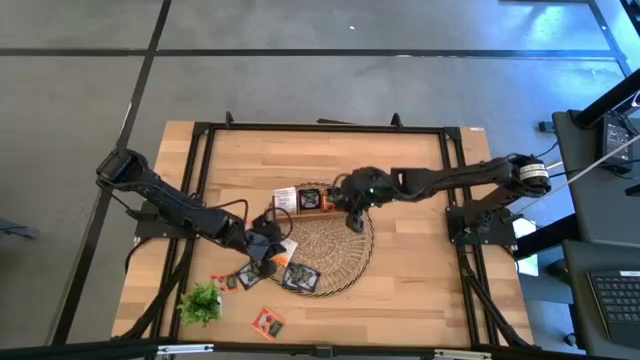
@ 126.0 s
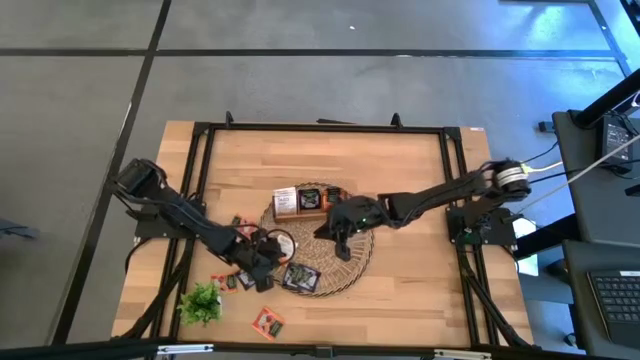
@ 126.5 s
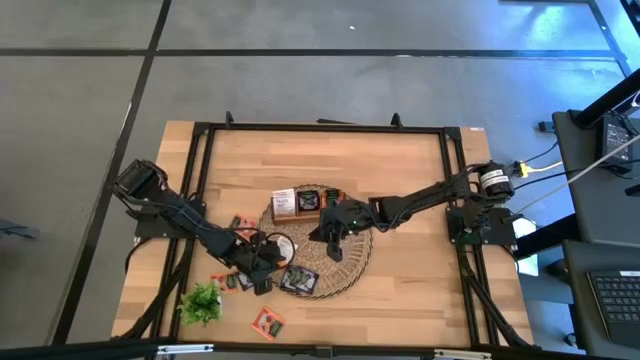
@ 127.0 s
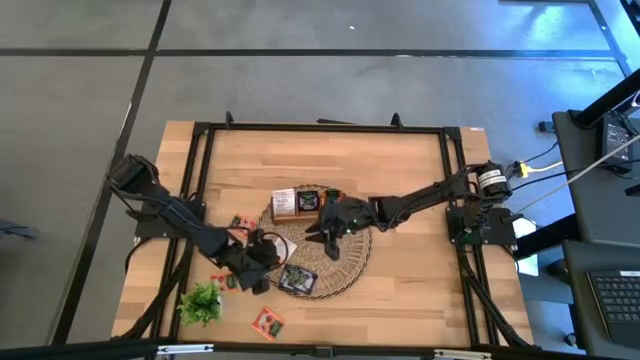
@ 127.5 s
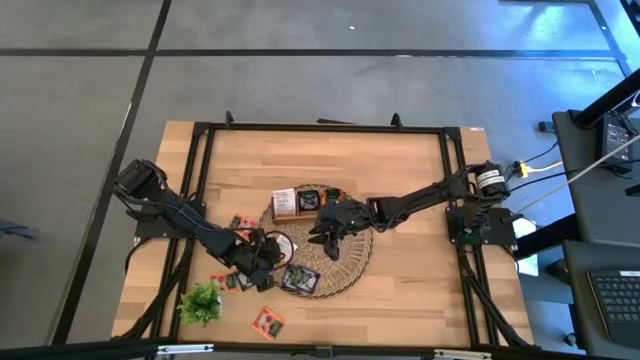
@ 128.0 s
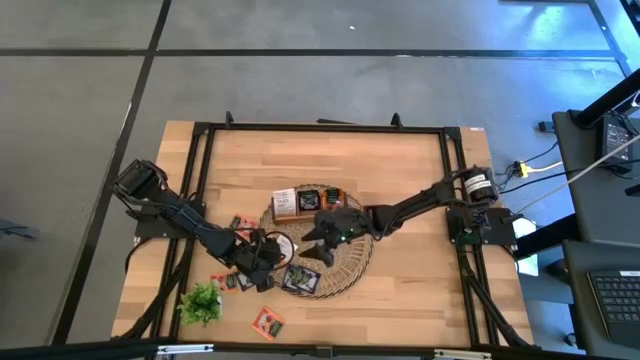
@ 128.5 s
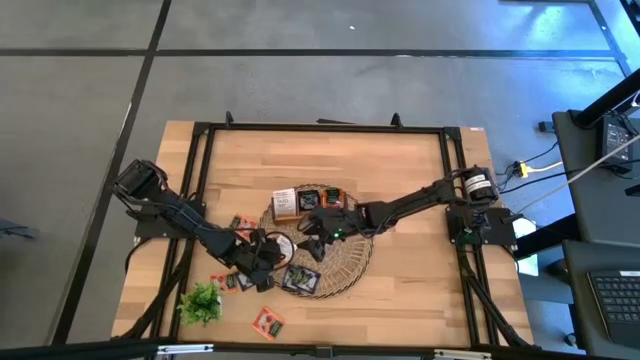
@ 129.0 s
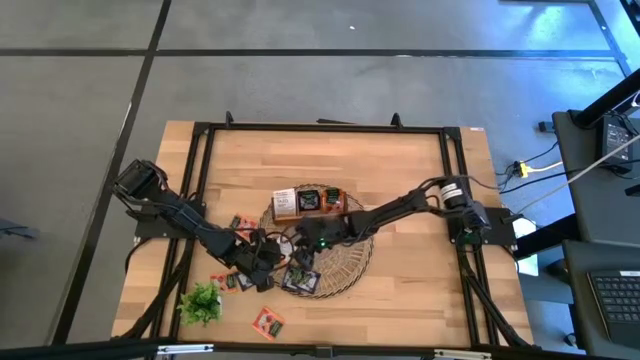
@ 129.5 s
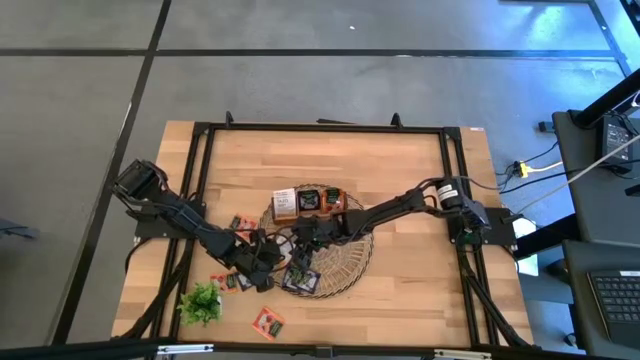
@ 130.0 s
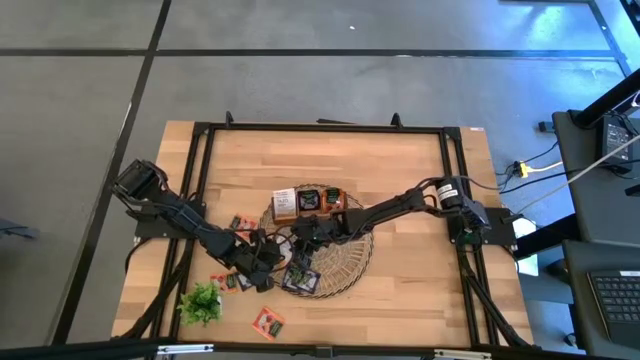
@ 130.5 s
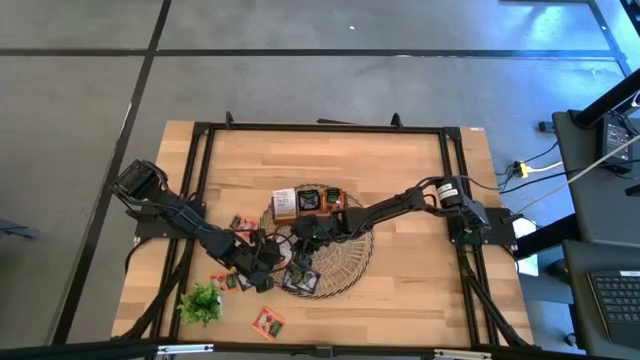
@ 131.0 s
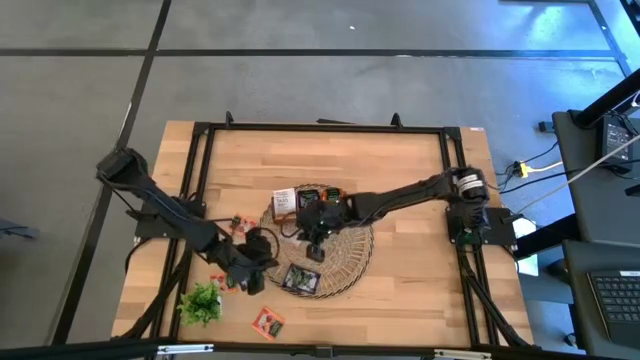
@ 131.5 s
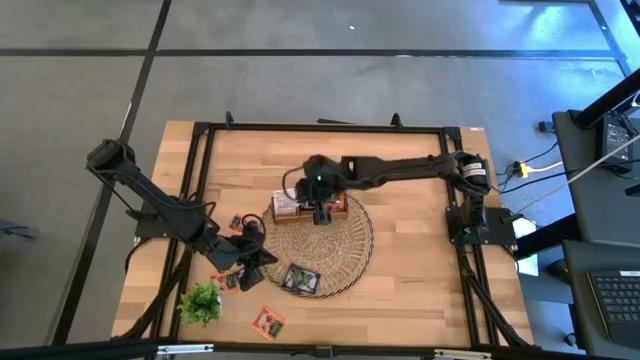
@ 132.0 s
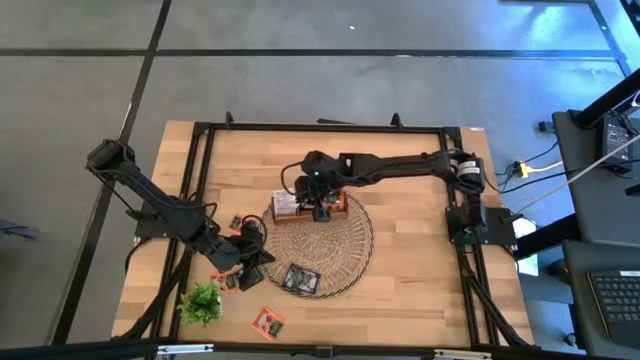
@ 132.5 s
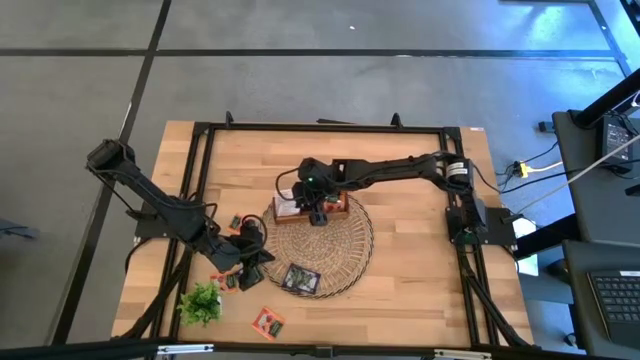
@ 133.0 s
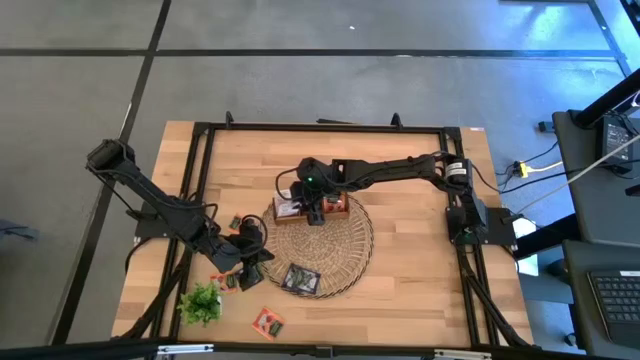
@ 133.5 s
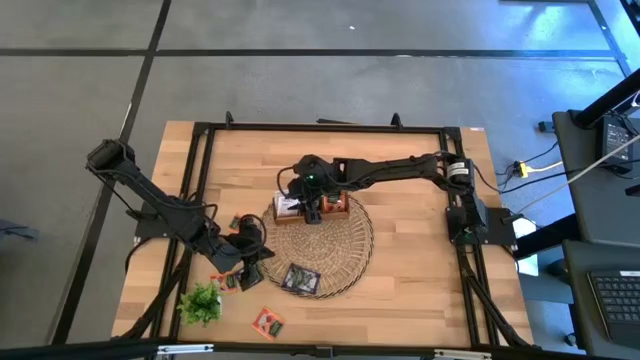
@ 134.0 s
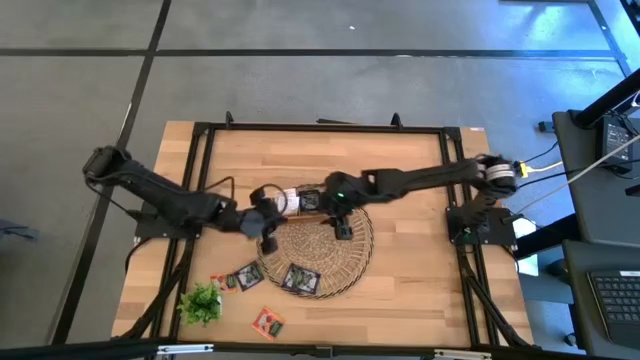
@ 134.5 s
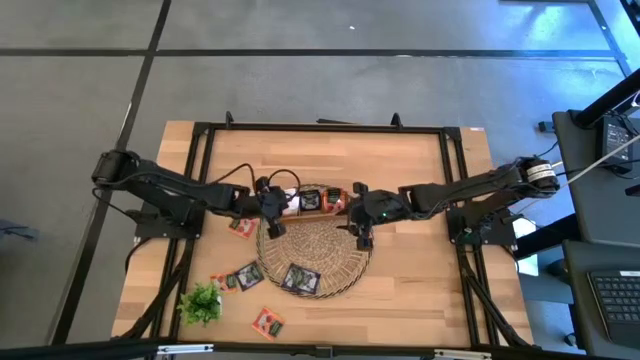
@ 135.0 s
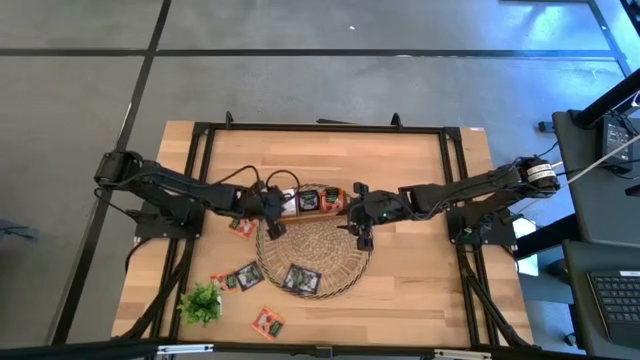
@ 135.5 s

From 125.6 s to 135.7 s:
Task: Pick & Place Tea
Put the white tea bag into the left slot of the wooden organizer

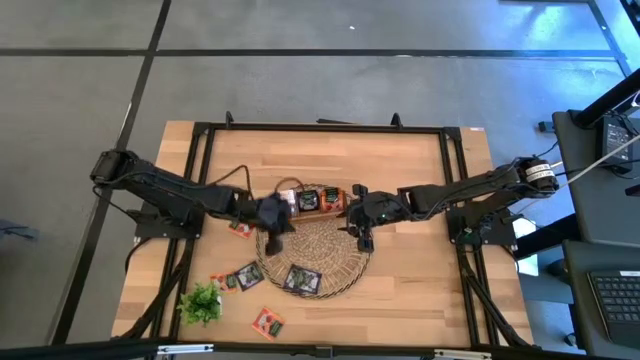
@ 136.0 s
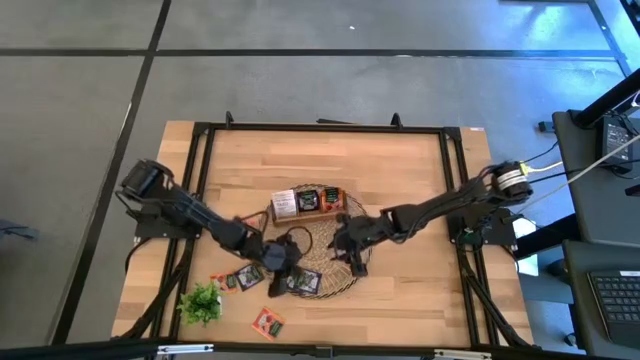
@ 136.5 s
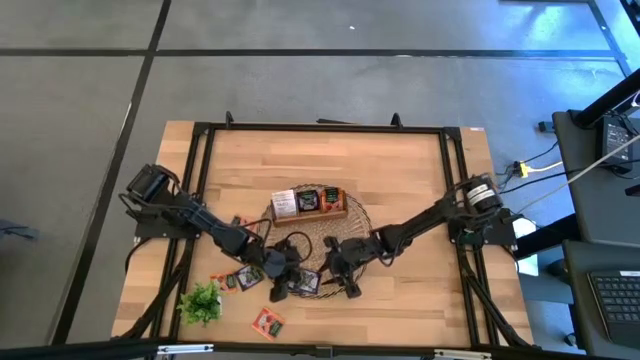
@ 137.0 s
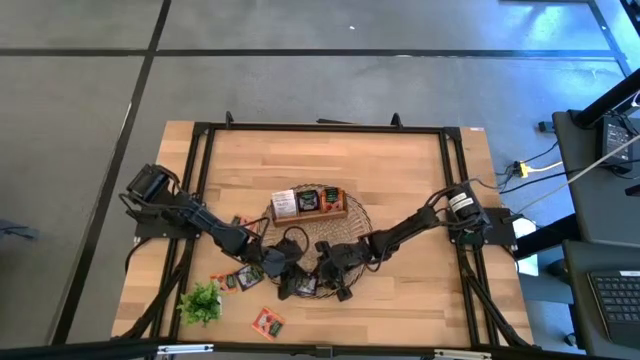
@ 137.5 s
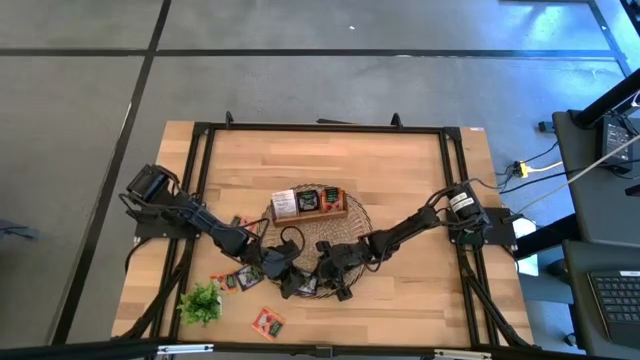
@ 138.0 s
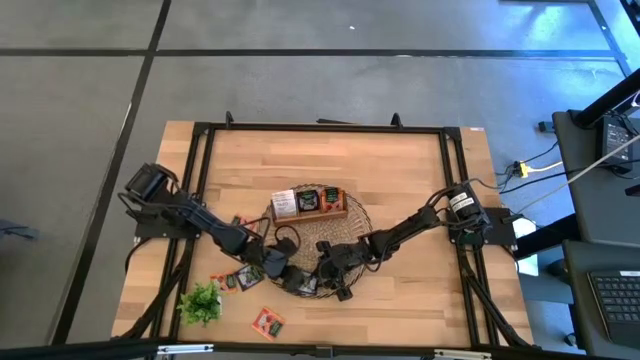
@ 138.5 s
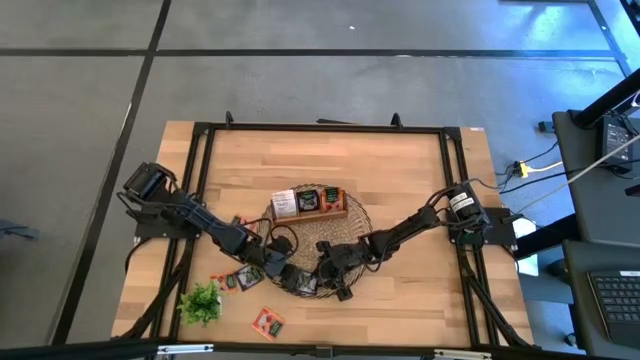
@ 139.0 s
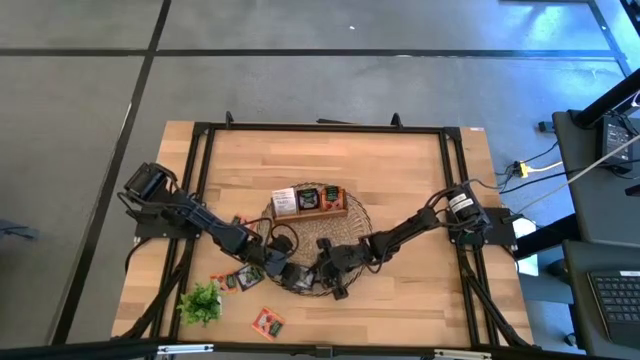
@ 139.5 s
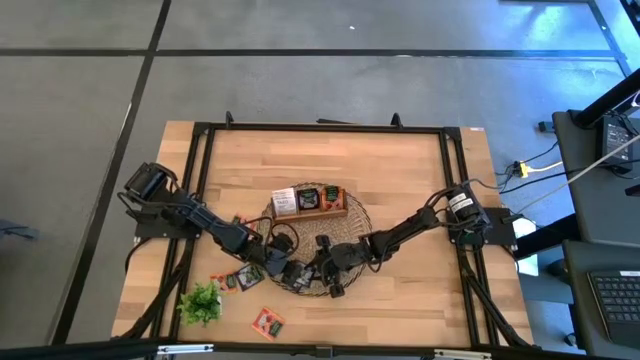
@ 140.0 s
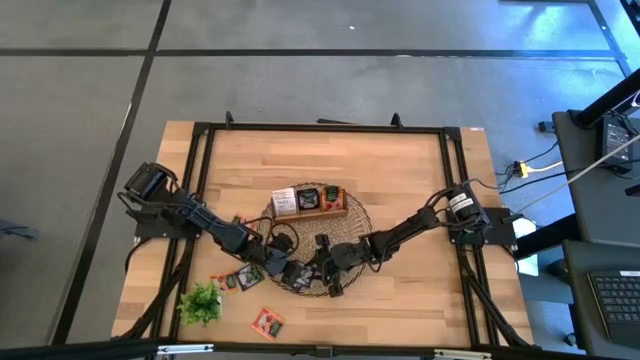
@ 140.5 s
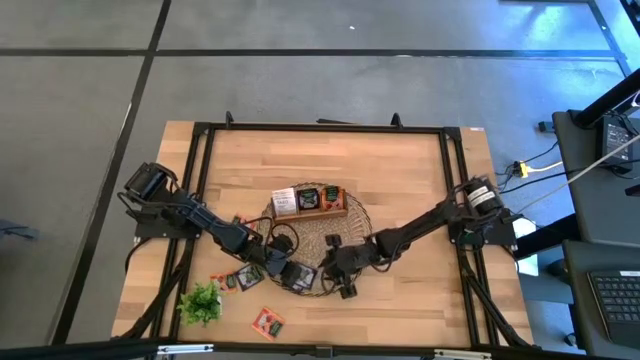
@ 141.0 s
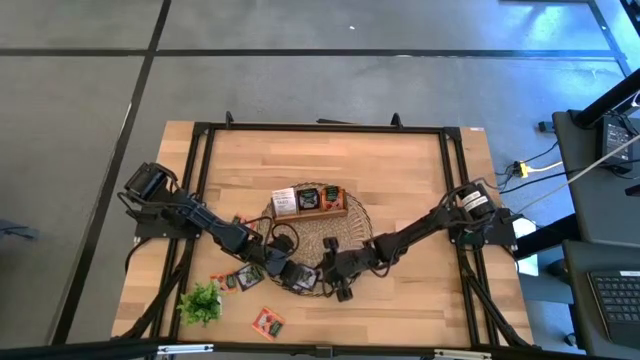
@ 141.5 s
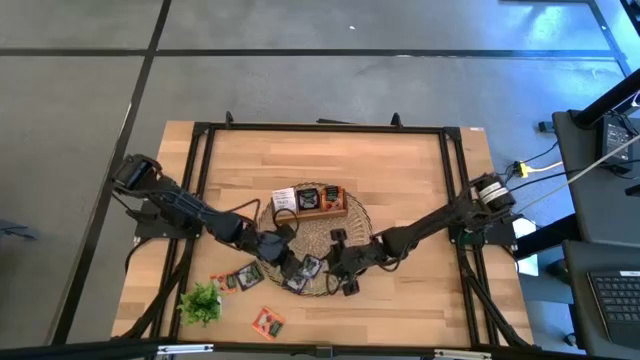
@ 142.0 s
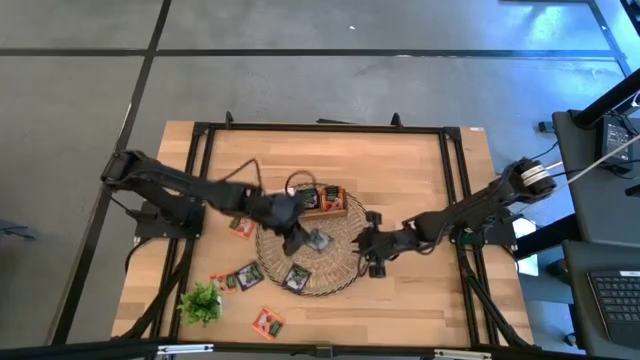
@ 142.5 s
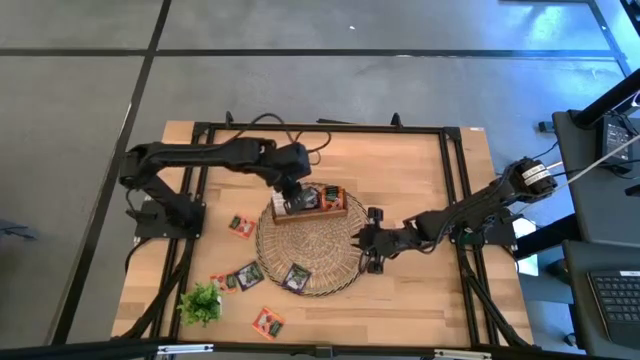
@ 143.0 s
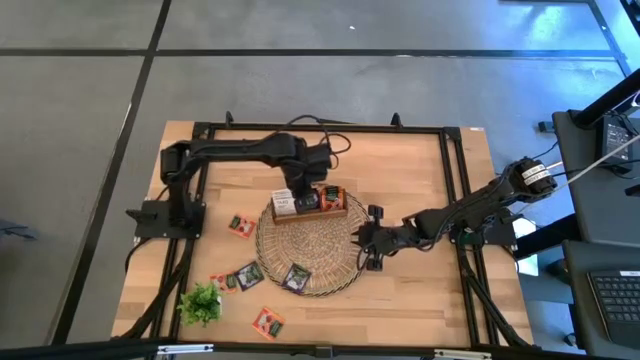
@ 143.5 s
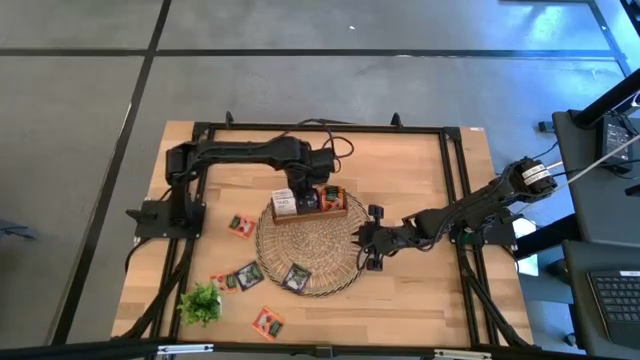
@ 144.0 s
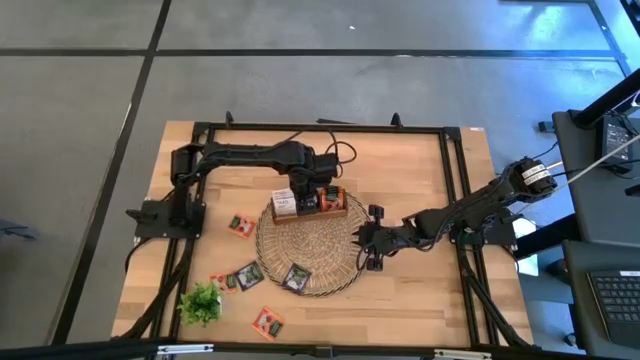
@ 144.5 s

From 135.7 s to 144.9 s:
Put the right violet tea bag into the middle slot of the wooden organizer
